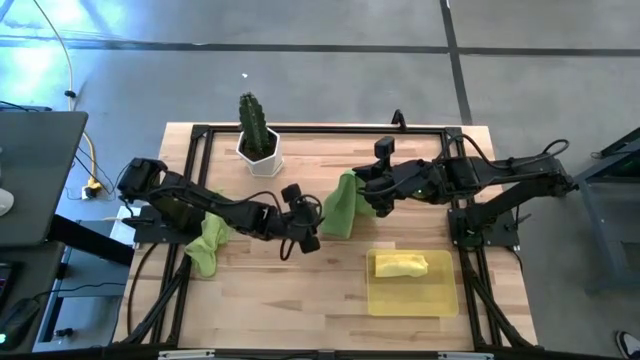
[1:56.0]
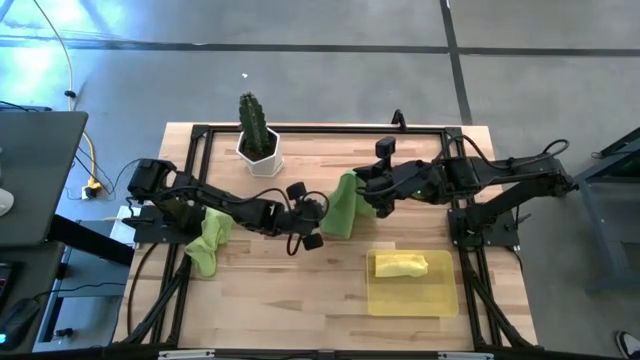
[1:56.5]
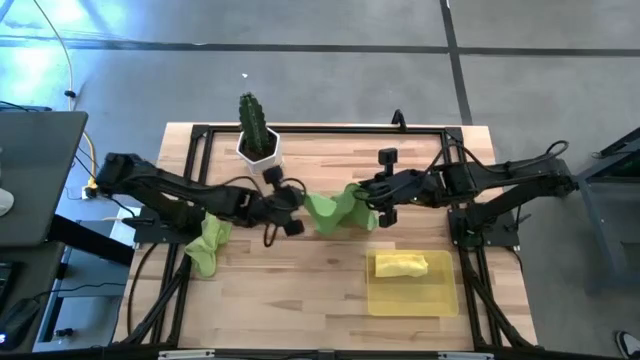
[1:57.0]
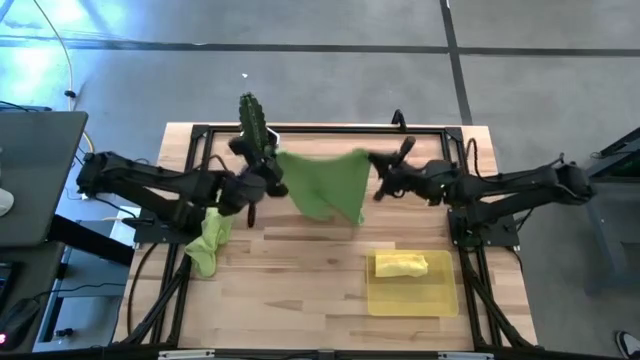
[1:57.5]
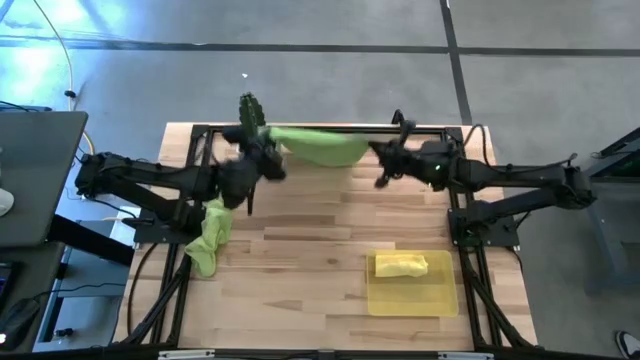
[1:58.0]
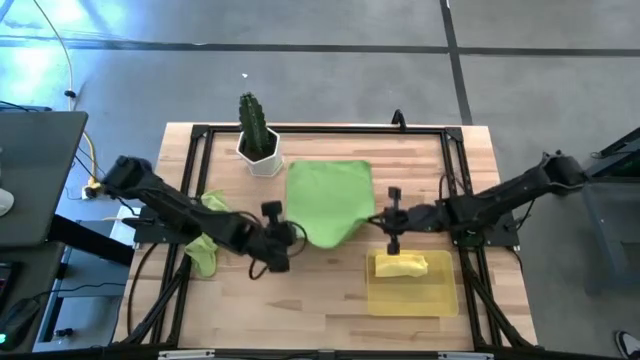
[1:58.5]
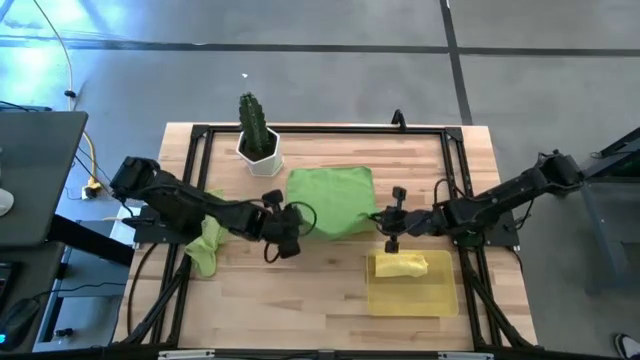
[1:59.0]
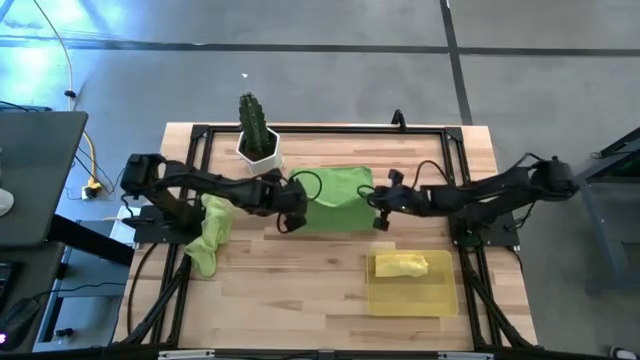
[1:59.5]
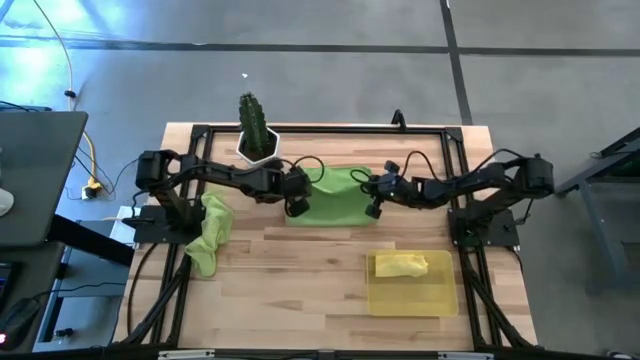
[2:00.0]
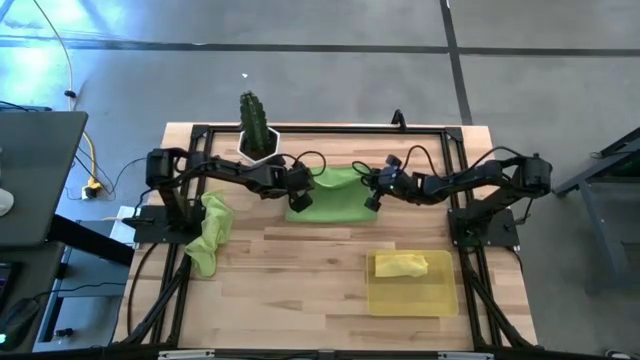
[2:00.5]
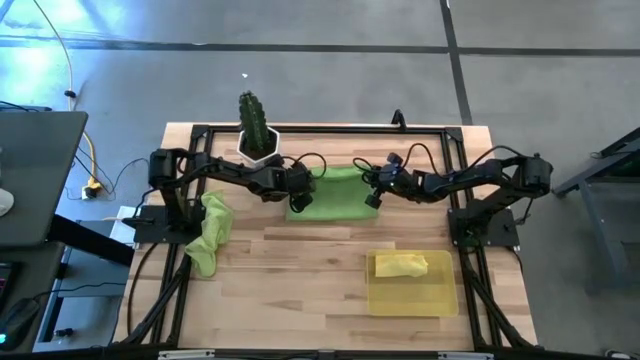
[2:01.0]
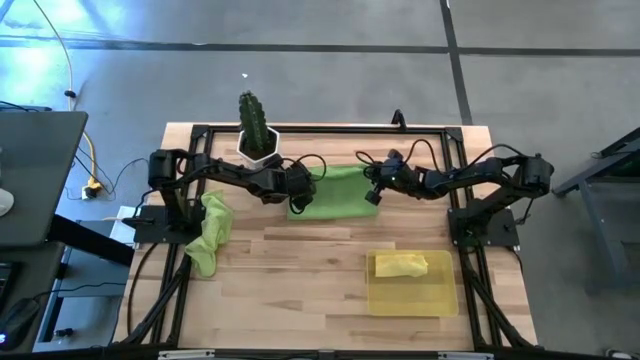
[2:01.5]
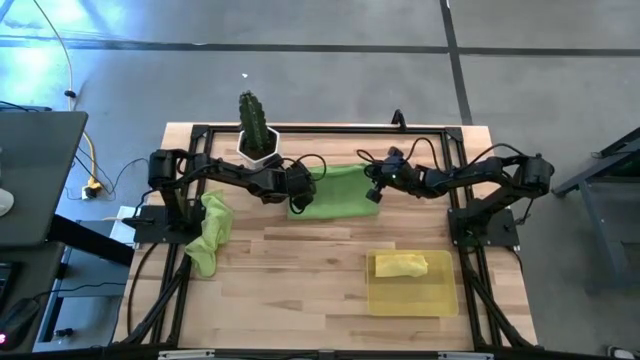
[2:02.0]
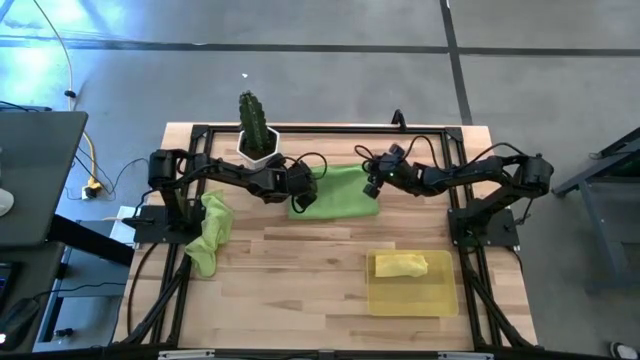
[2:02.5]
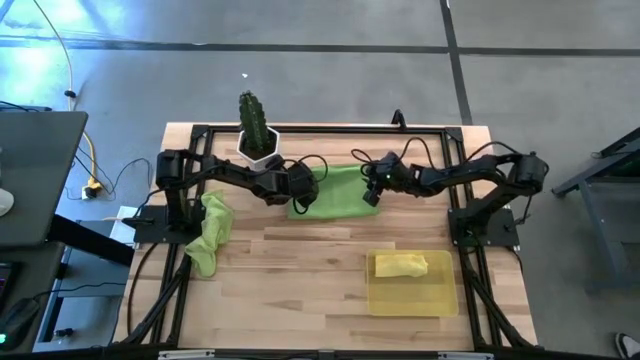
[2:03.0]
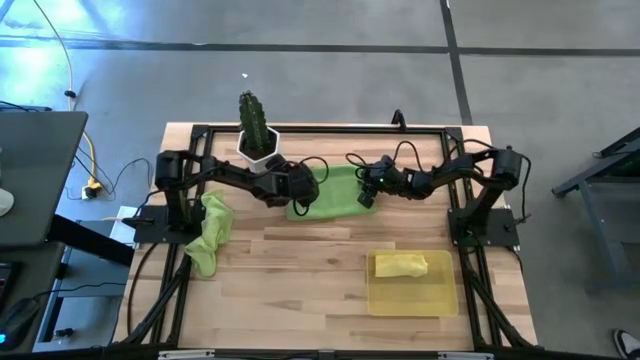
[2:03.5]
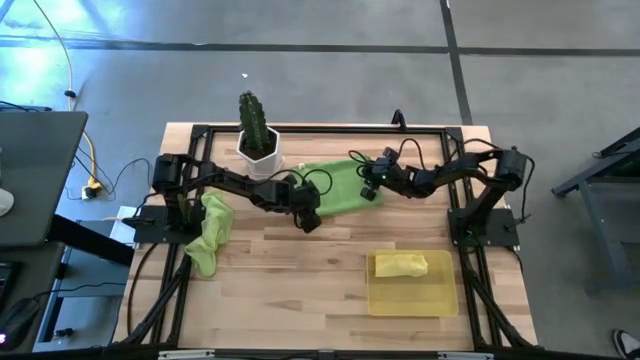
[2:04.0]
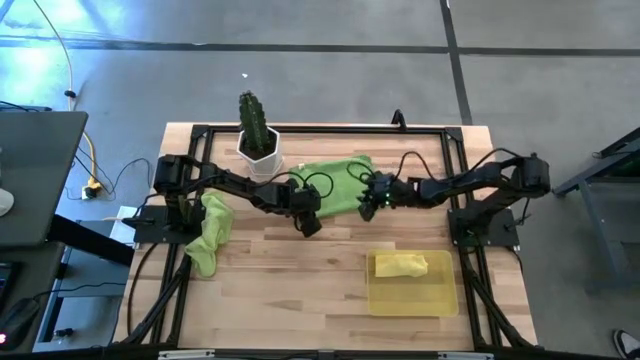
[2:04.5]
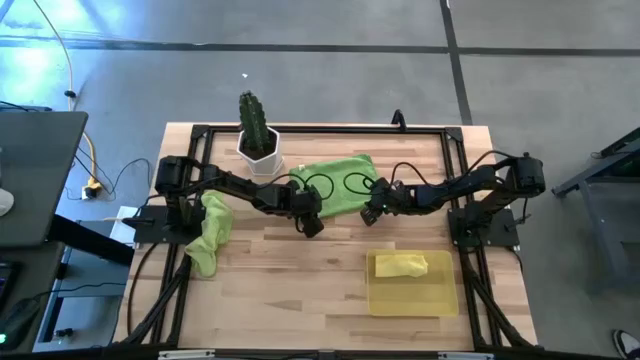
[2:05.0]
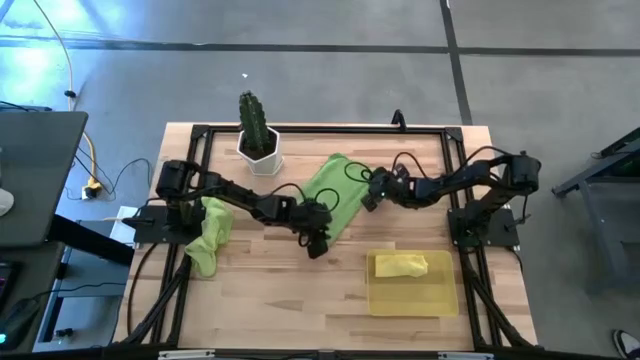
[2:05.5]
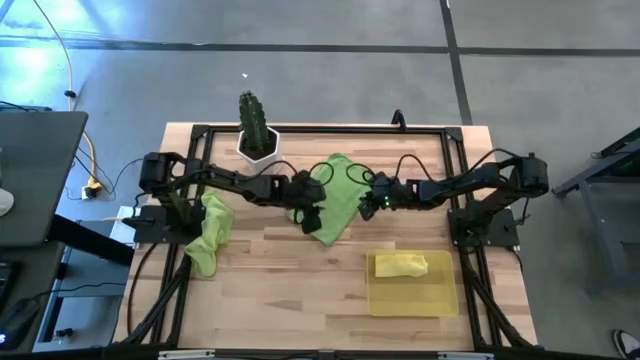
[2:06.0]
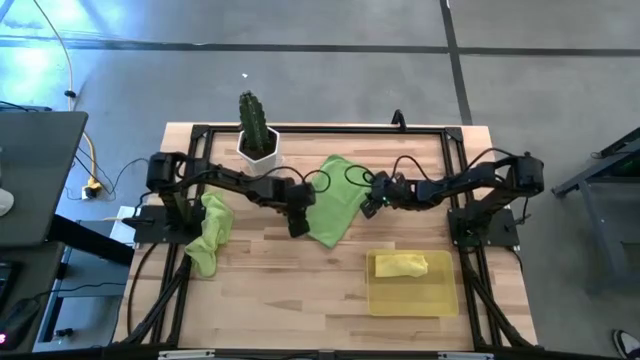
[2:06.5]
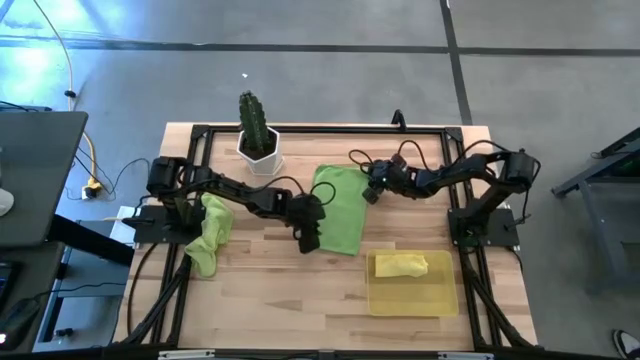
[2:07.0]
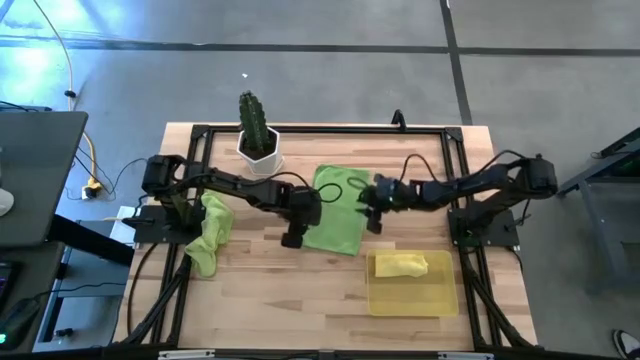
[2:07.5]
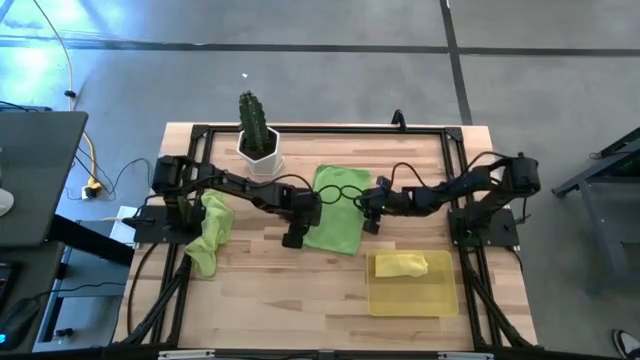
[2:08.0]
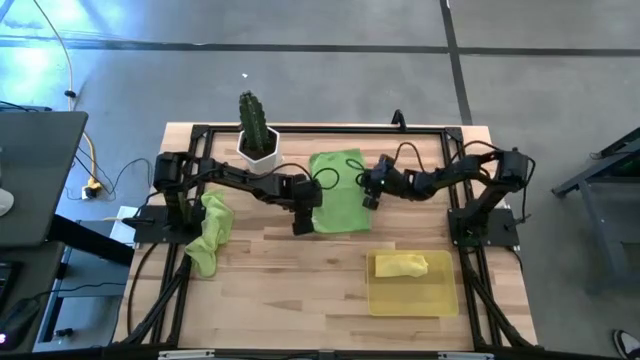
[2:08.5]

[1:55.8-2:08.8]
Task: Roll microfiber towels into tight, uniform cylinder then place into a basket
Fold the green towel

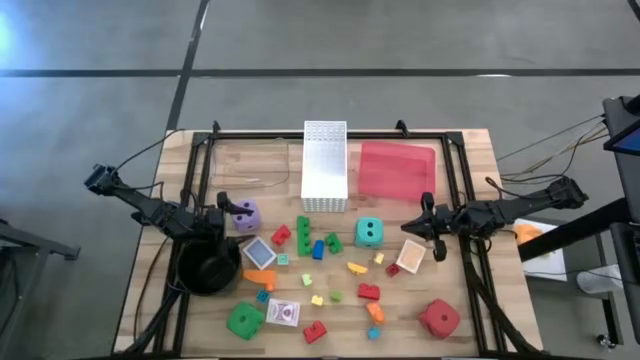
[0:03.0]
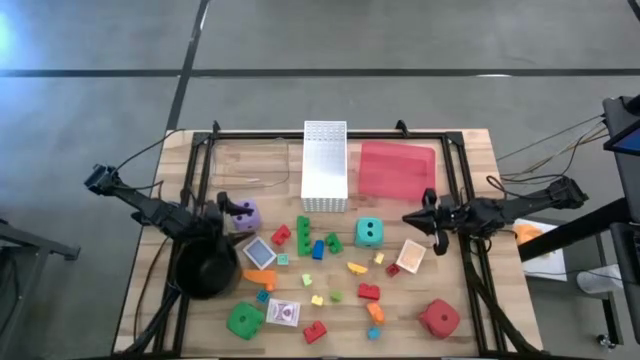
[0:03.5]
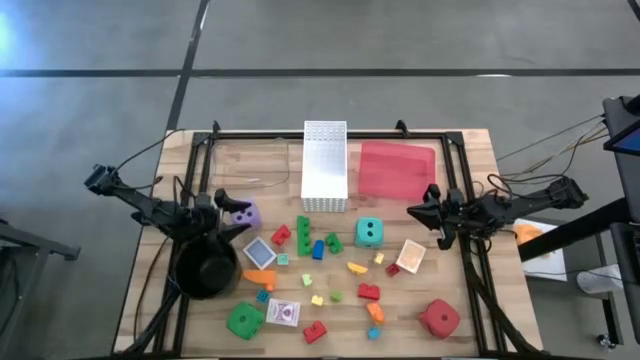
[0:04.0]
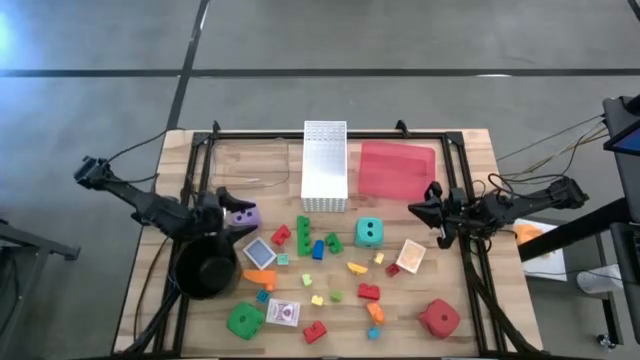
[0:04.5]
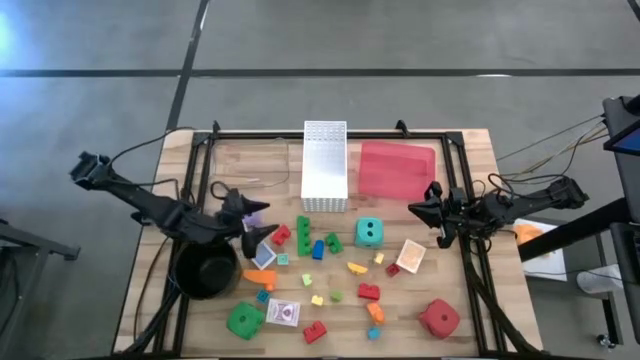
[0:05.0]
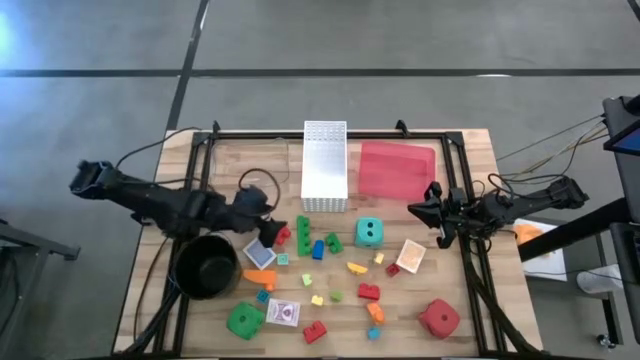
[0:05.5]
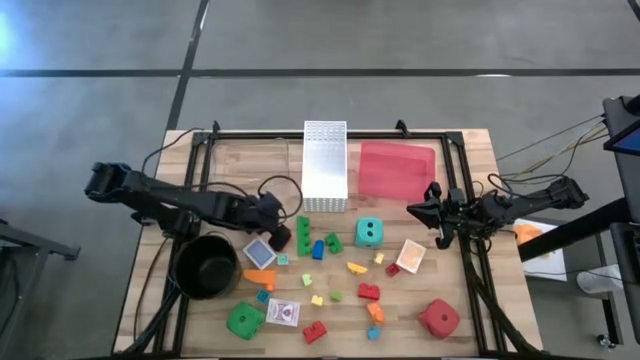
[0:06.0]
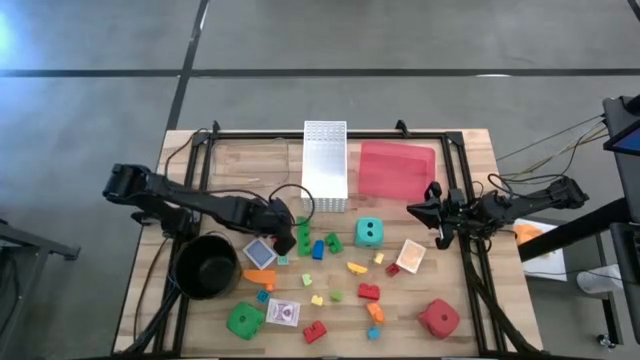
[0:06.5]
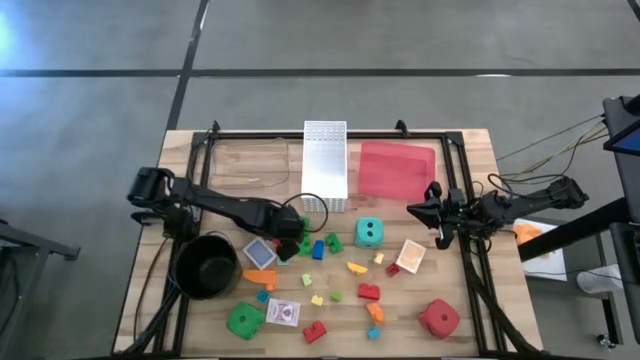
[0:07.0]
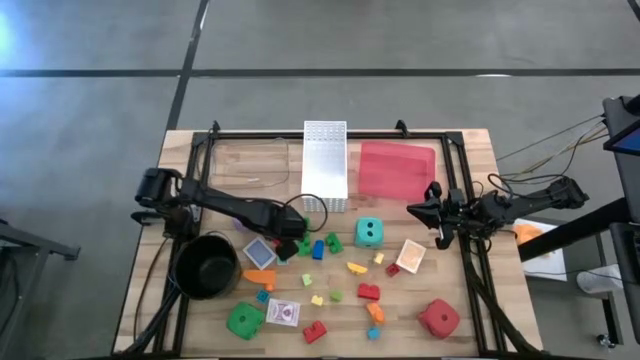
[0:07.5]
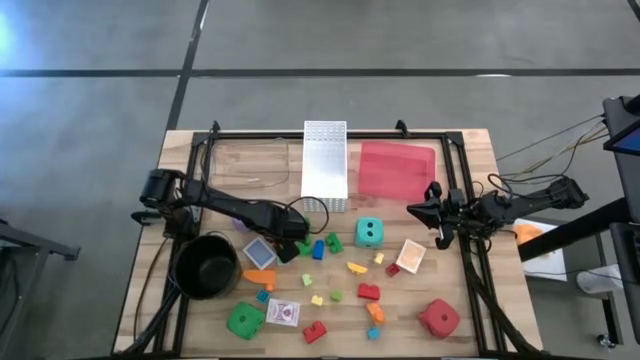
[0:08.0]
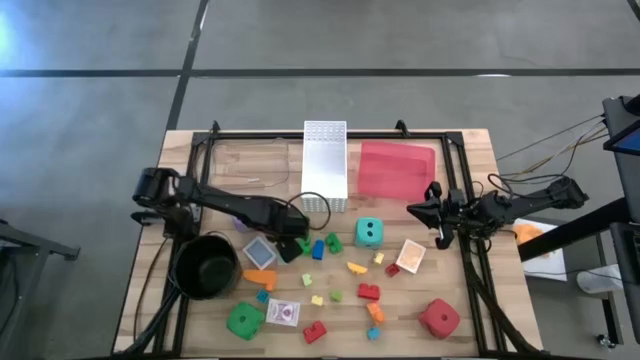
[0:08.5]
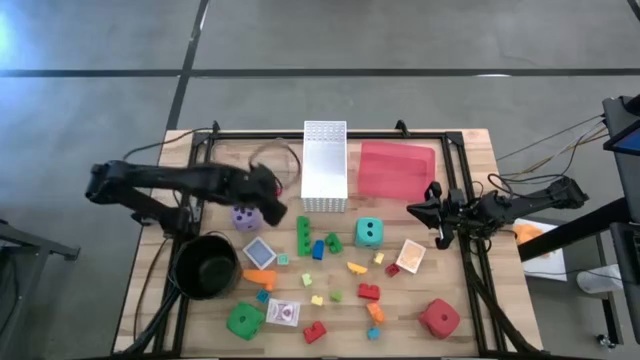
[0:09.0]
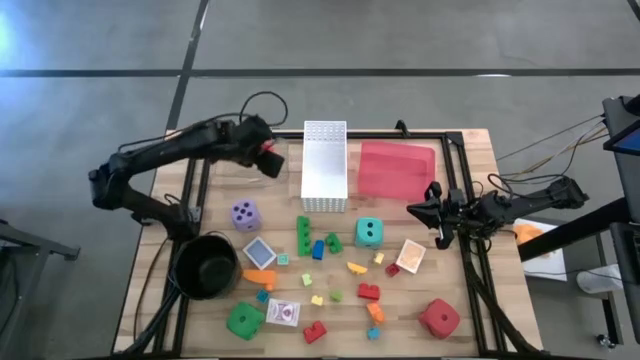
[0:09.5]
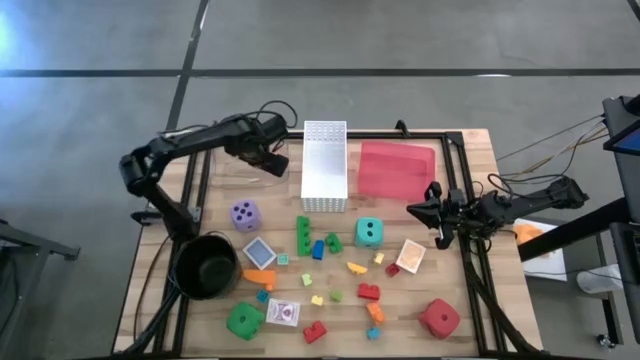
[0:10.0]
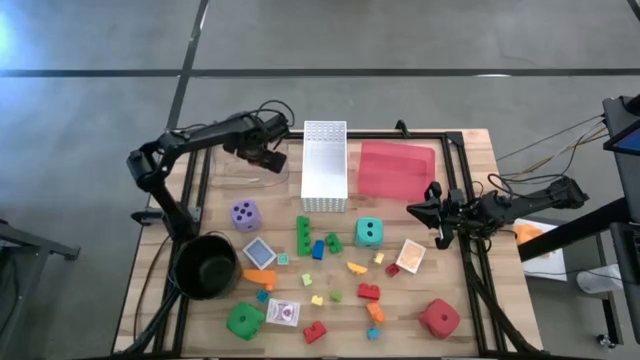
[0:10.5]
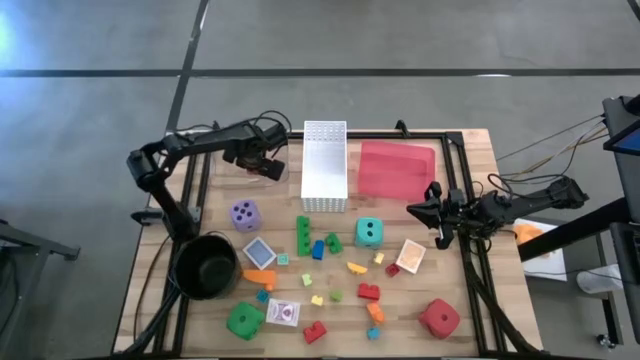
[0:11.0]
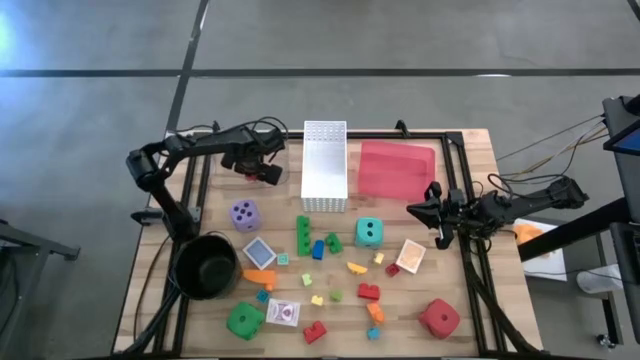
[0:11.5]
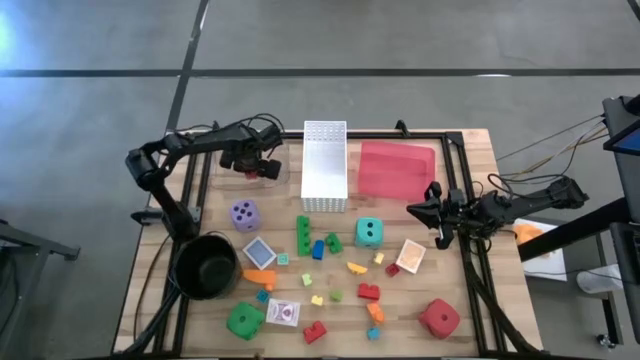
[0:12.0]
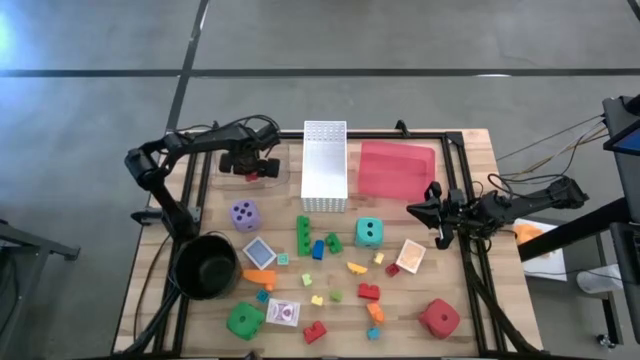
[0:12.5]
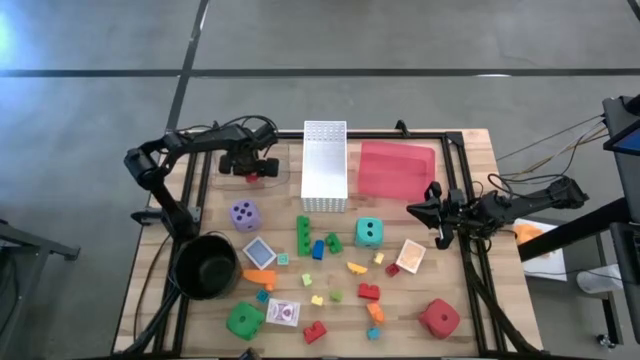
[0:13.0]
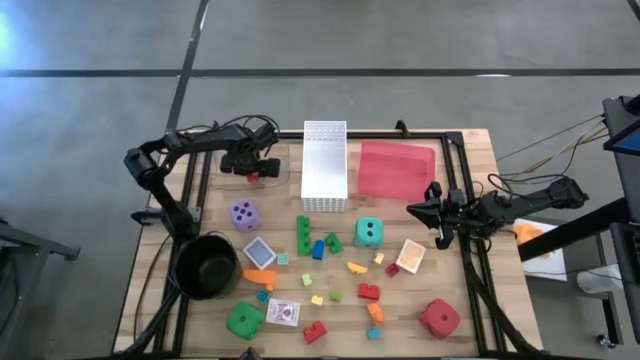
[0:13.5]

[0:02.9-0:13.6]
Task: Pick & Place Toys
Put the red game piece into the transparent bin
